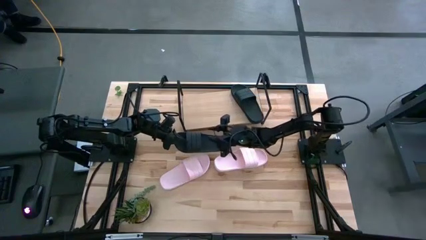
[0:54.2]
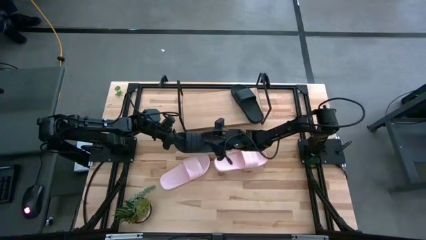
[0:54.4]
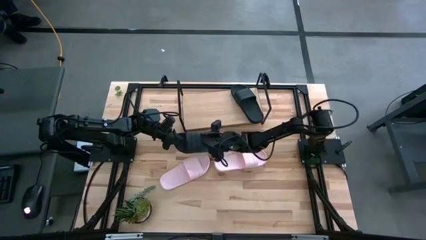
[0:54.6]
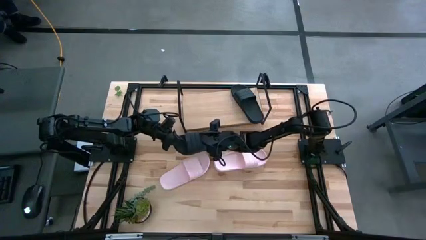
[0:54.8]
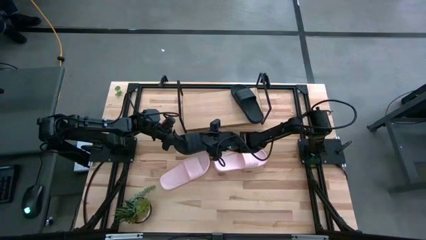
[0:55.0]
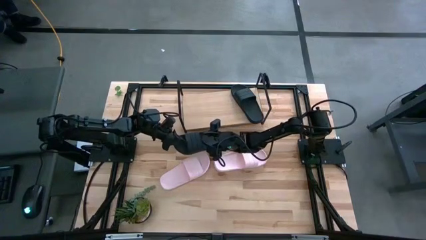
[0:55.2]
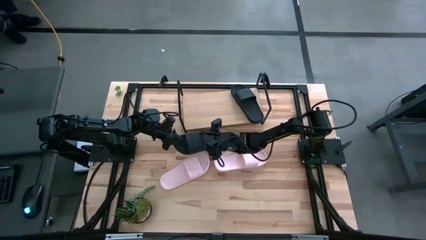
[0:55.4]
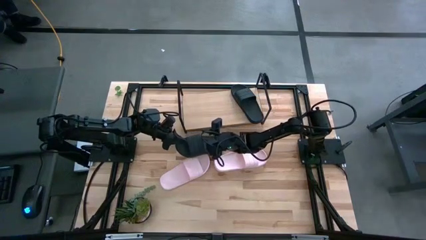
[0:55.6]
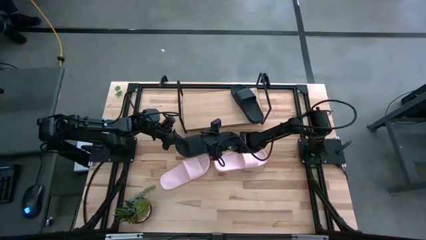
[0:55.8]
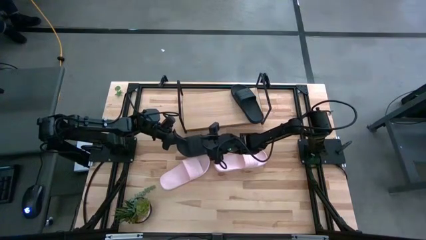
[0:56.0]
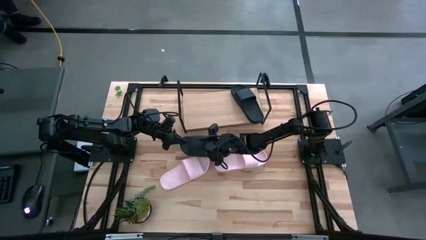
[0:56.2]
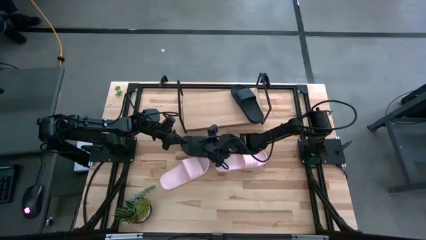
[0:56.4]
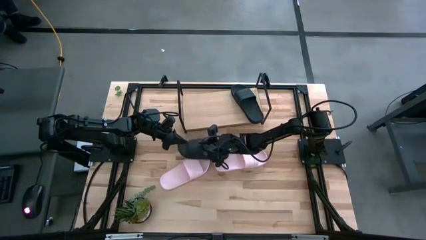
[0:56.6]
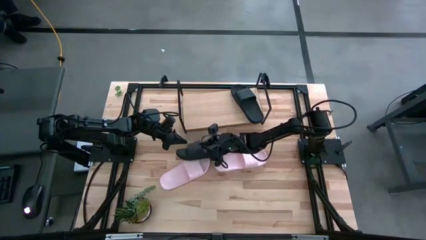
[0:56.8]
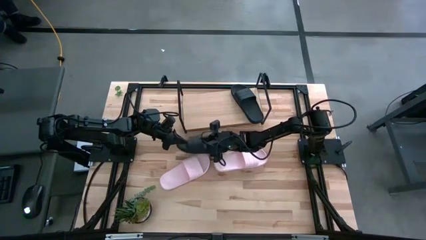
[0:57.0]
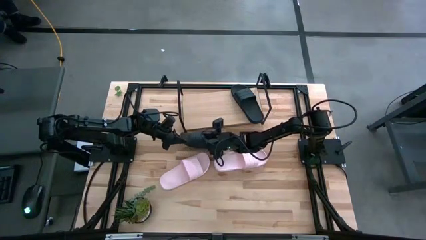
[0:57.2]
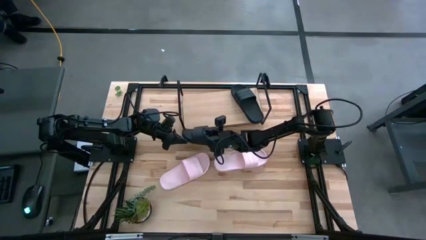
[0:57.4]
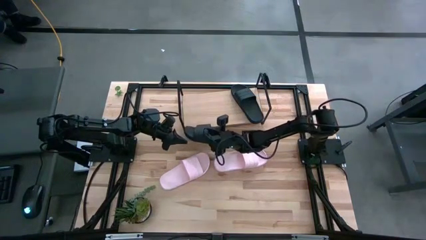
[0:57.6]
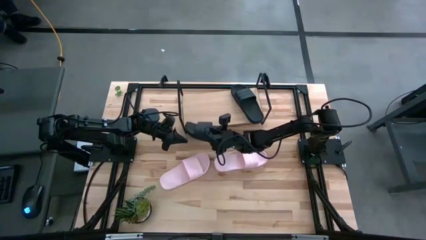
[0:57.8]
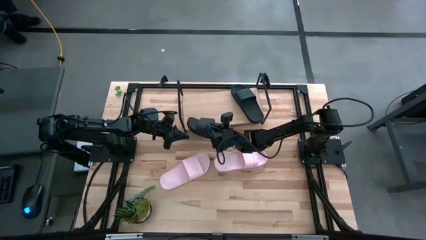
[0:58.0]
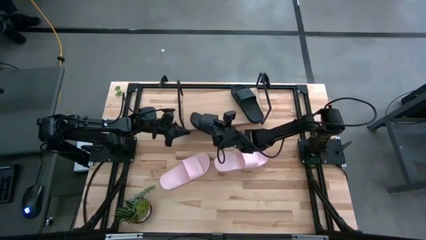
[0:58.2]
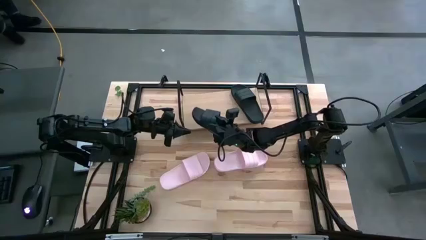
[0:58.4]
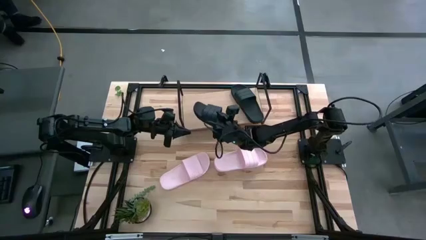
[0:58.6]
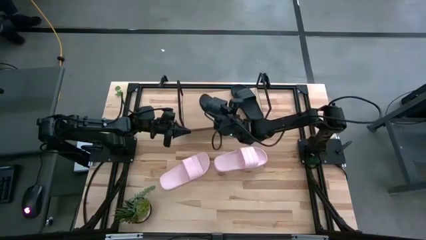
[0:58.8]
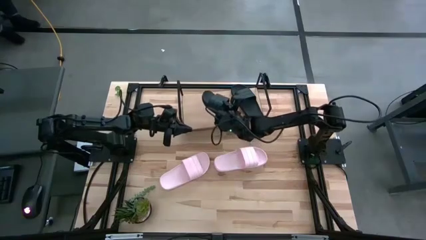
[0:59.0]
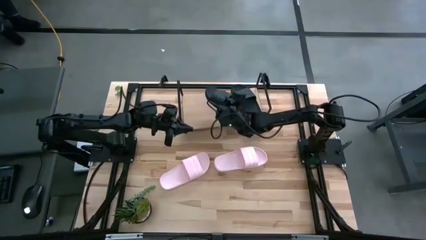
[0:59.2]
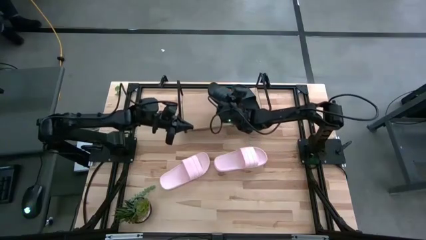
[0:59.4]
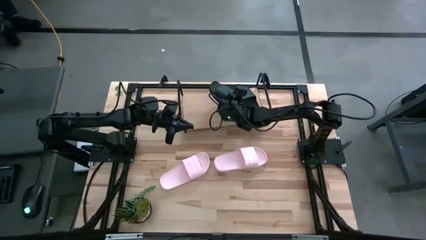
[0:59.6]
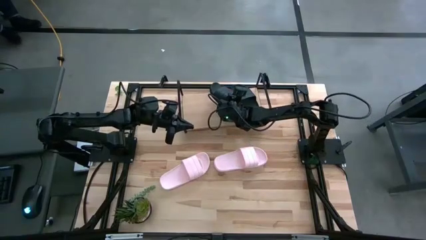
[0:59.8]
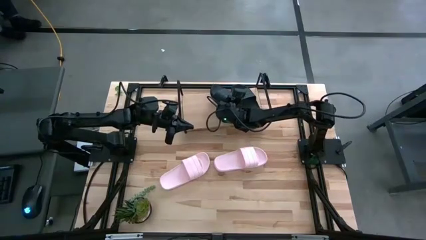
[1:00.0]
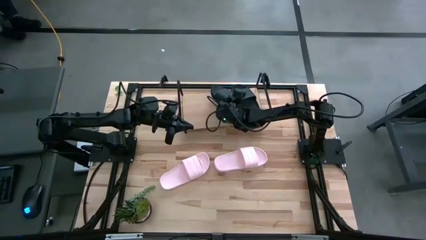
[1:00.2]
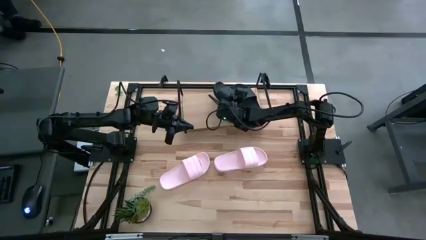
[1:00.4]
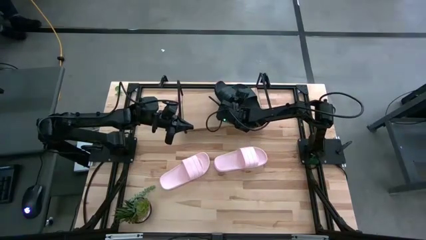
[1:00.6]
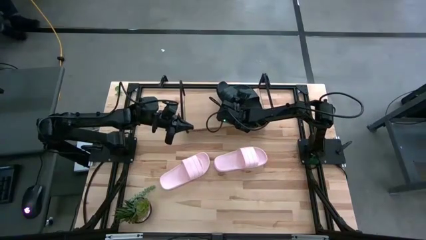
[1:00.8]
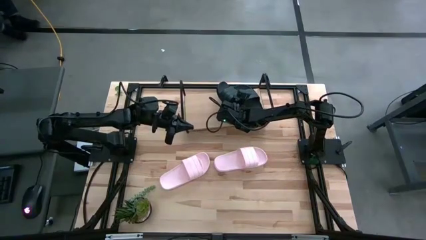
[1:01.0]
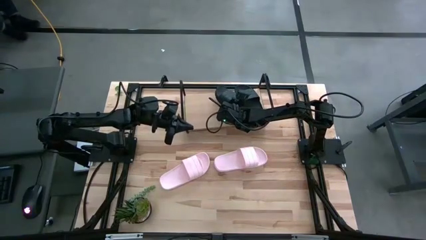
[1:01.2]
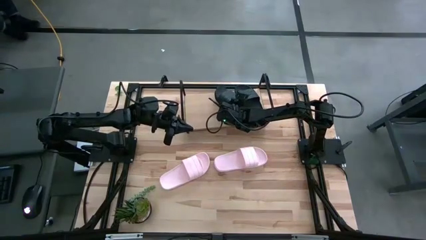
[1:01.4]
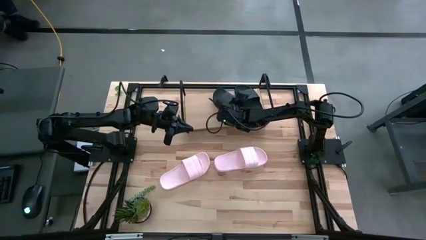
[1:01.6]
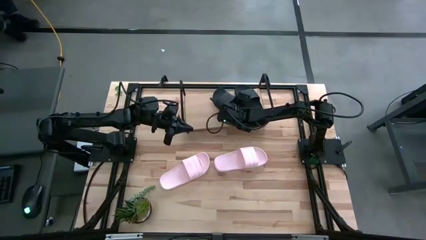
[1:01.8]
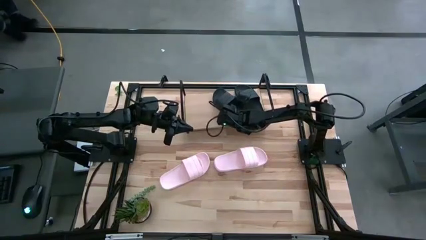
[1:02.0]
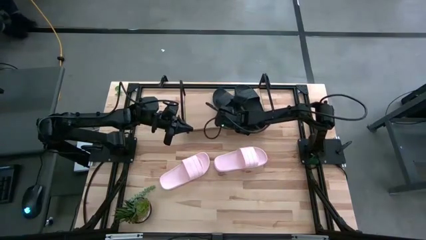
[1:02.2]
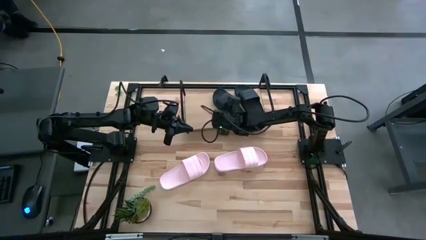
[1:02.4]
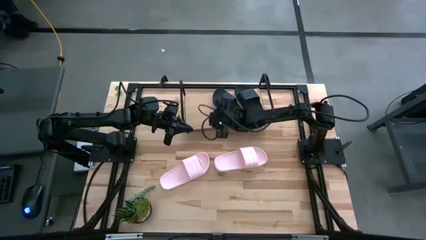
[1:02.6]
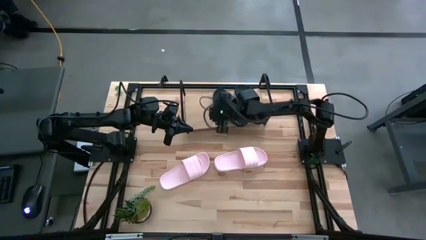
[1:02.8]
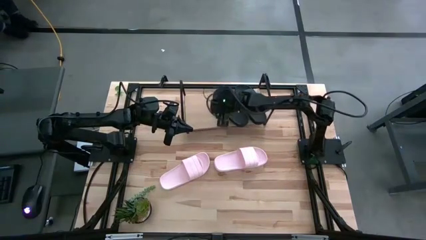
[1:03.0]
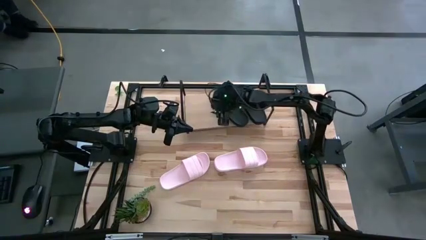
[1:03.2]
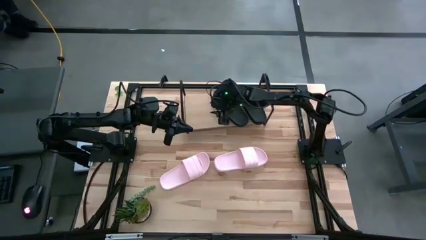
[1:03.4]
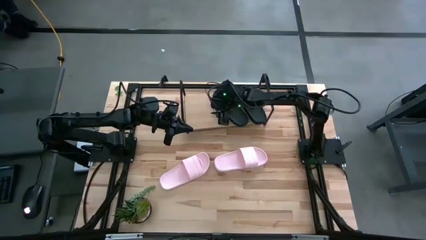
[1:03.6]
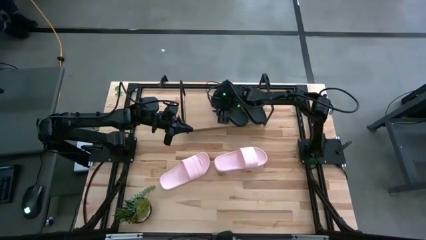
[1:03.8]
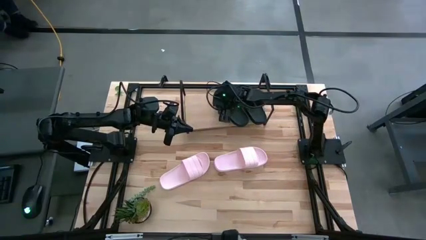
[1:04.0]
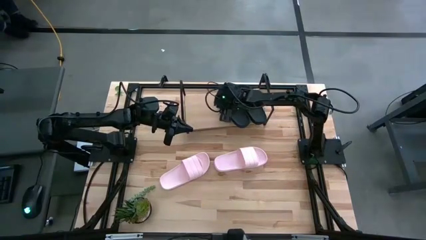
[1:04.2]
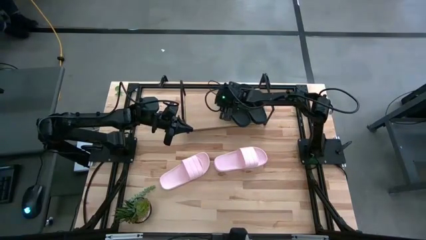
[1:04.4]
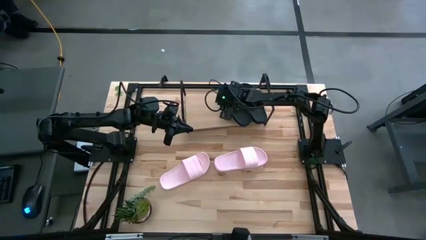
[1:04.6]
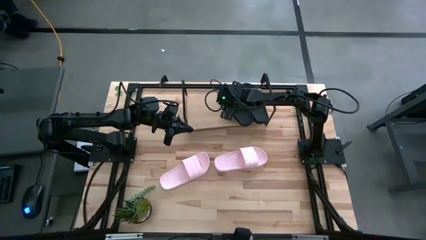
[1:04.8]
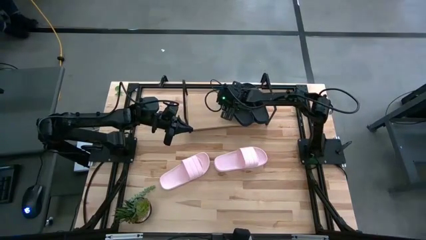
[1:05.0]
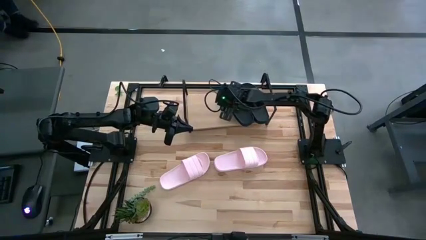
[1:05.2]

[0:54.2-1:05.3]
Task: Pick and place slides into the shelf
Put the black slide on the shelf
